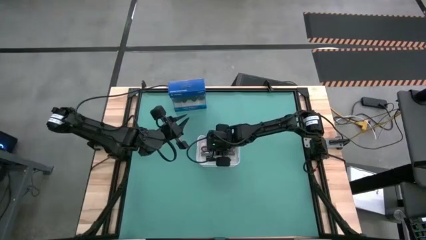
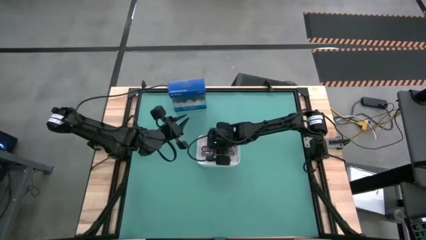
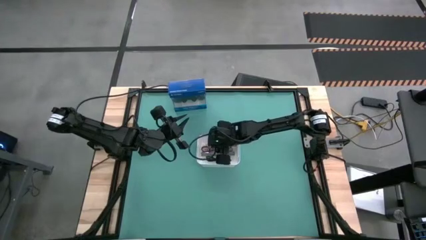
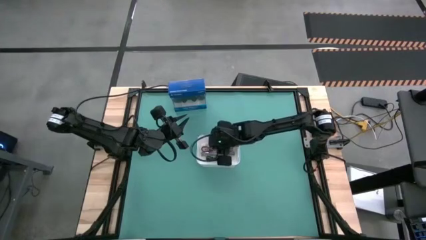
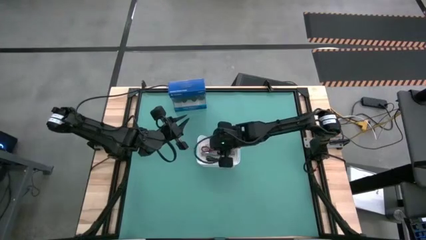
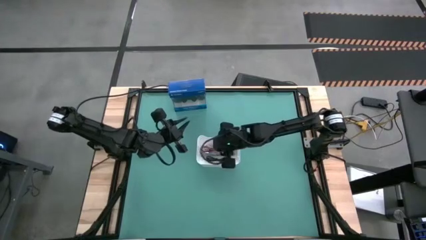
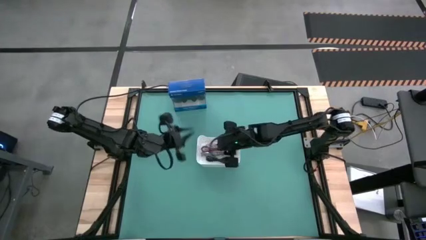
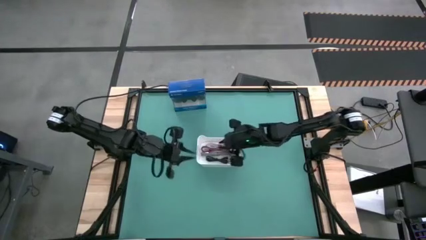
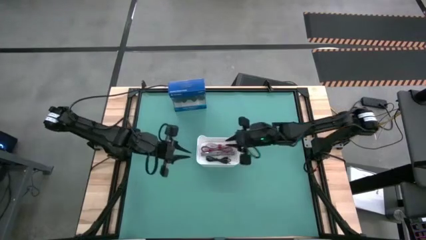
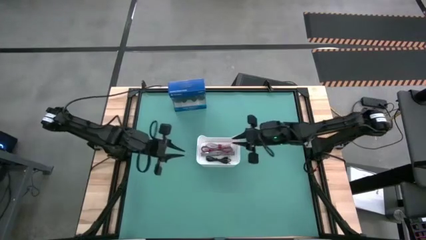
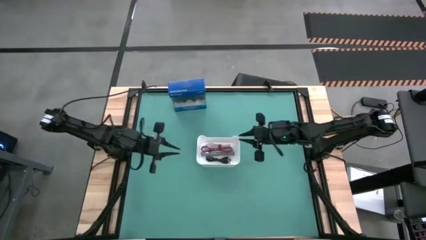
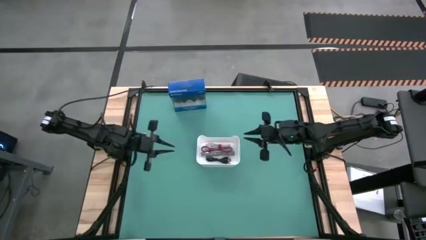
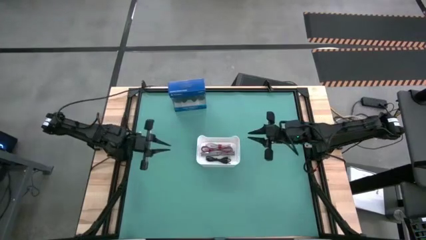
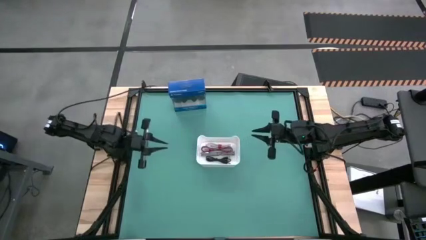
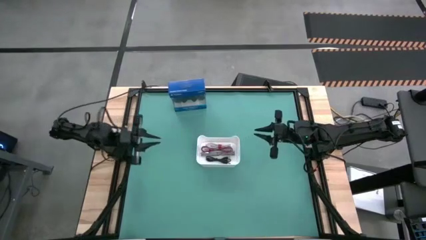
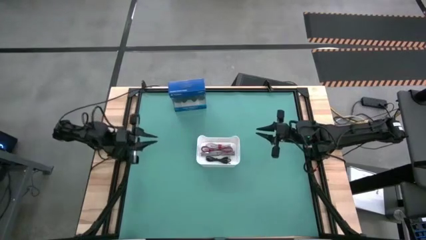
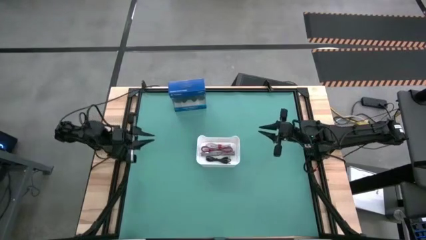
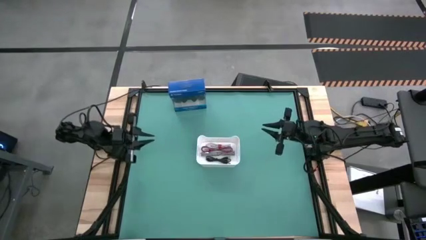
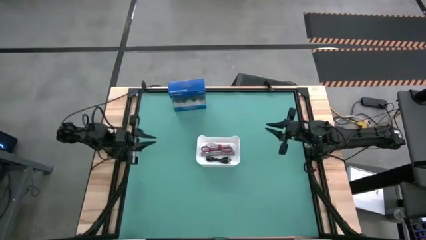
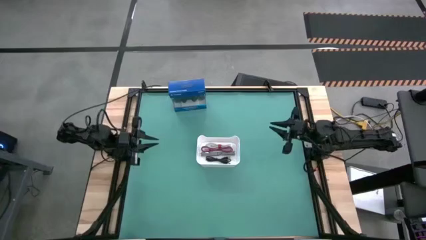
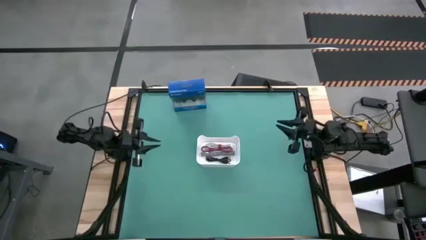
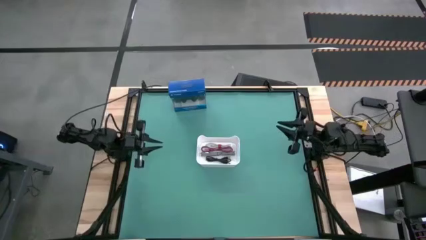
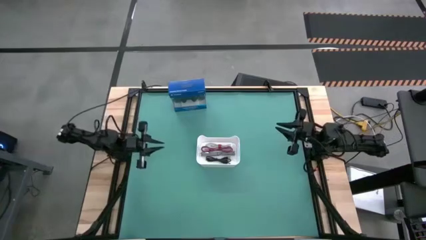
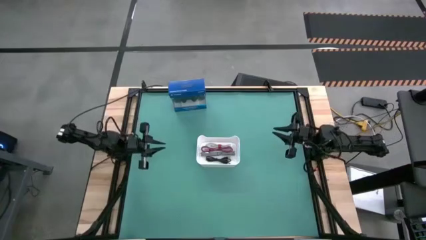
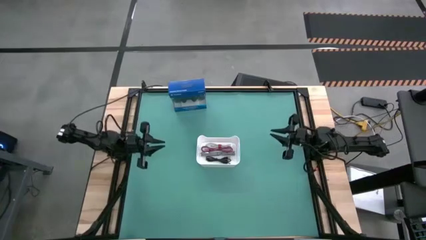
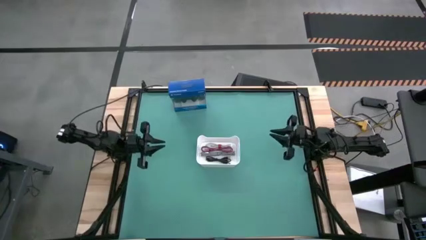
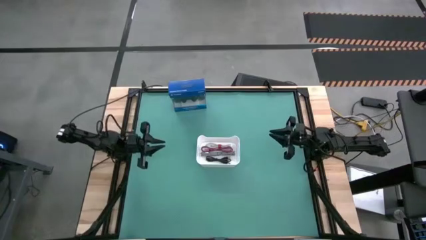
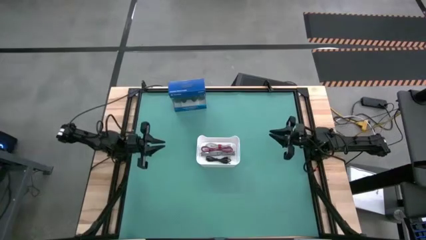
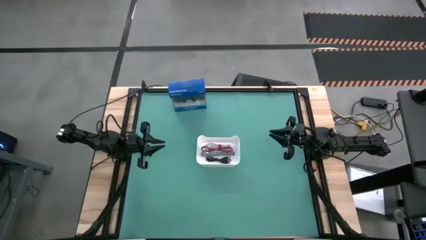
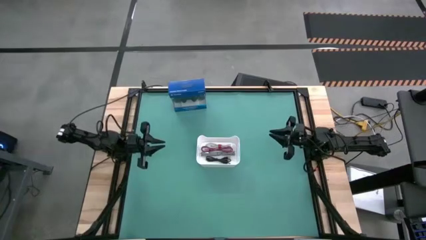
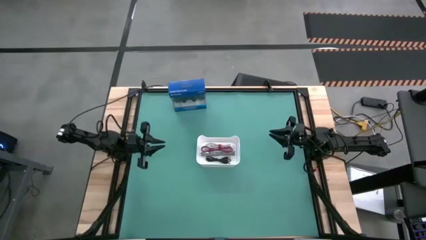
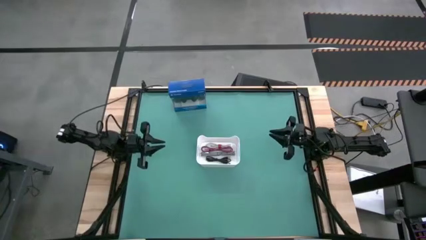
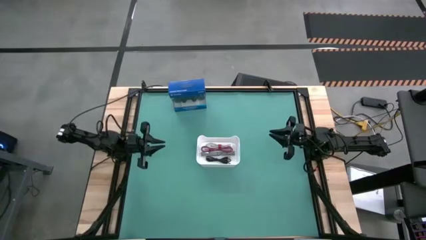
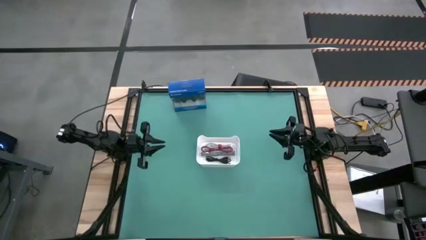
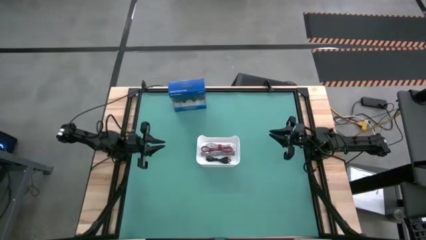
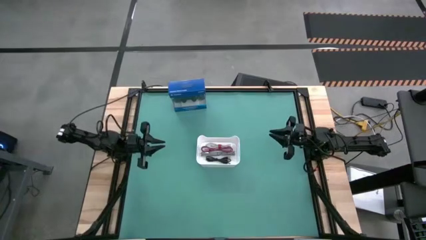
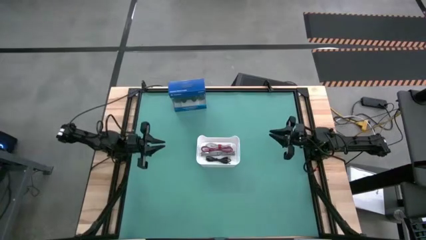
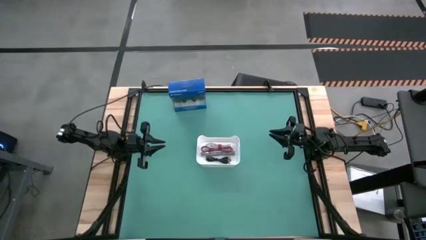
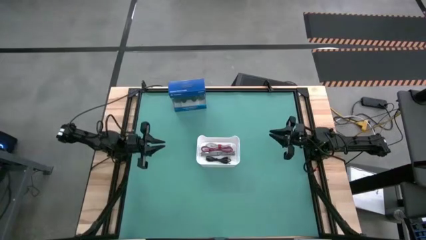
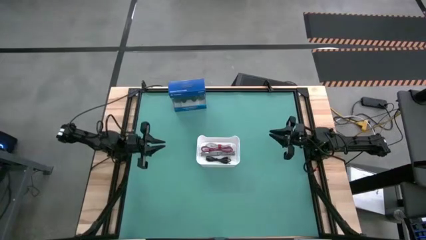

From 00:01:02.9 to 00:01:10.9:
Task: Pick and place USB-C Cables
Return to Home Position

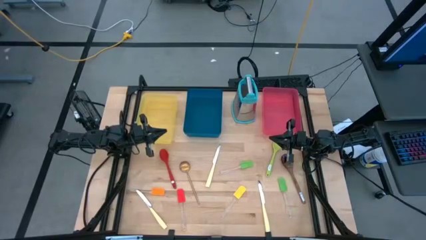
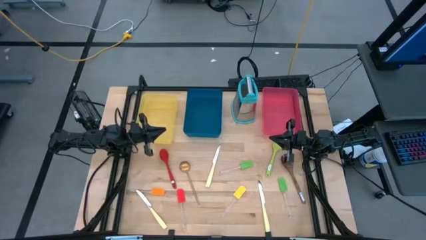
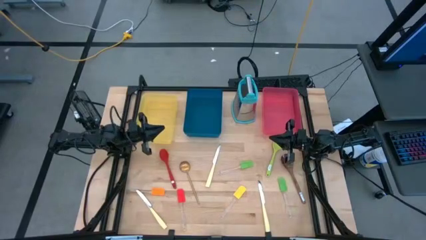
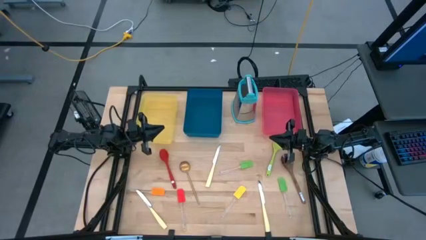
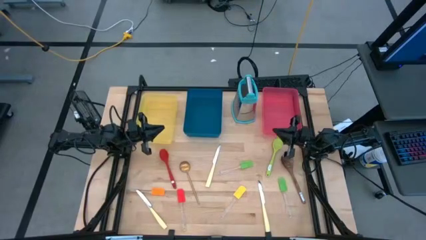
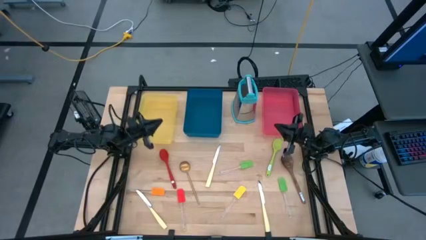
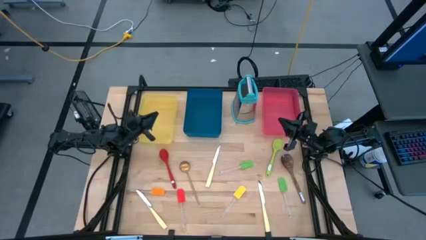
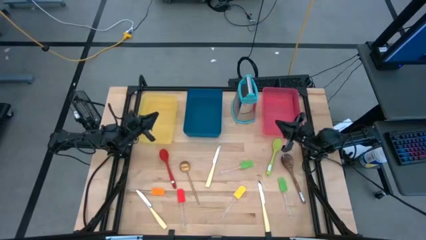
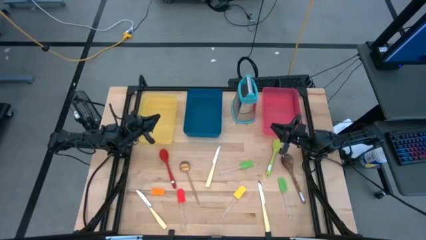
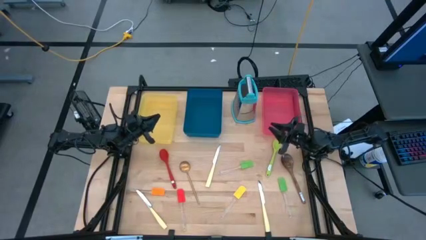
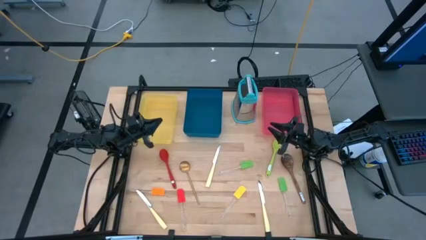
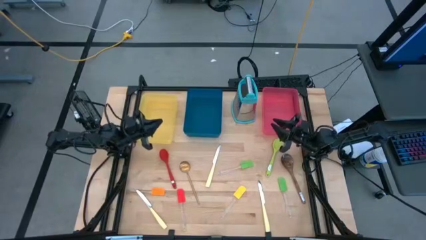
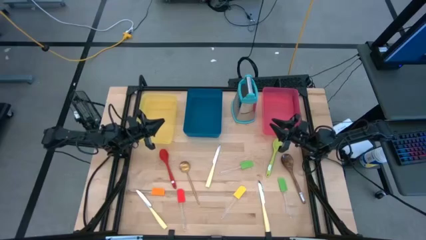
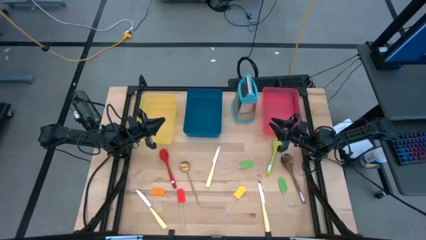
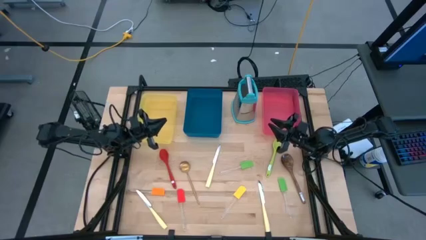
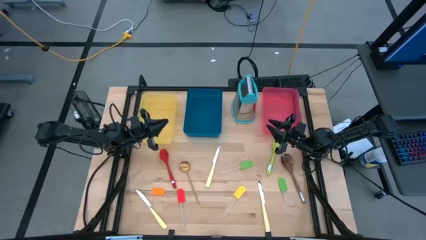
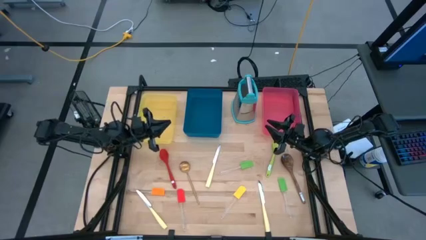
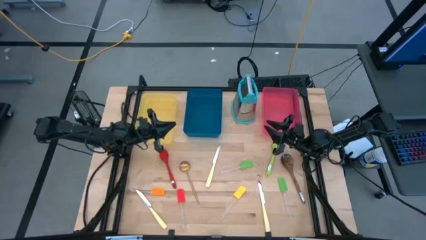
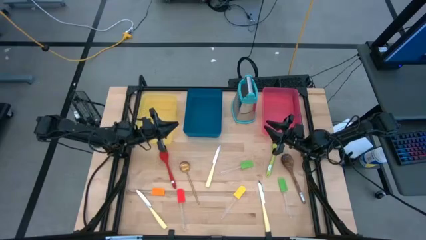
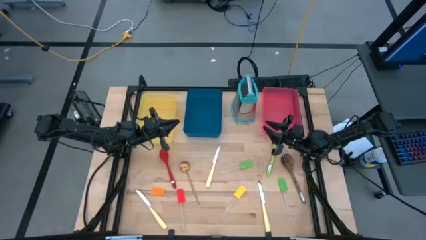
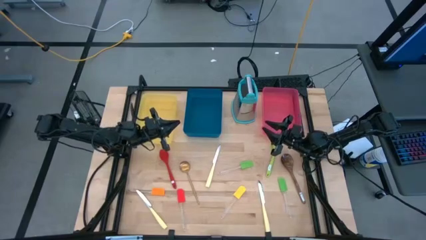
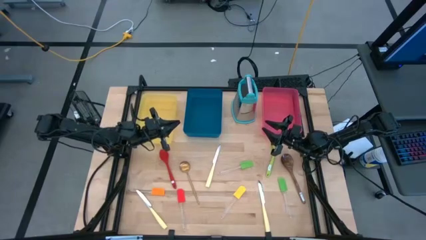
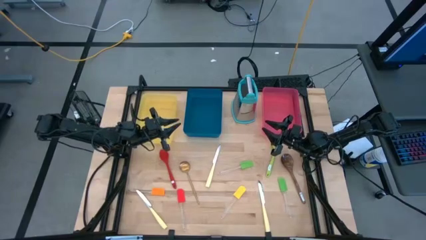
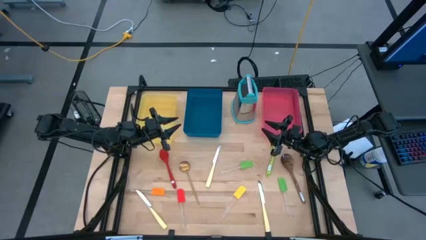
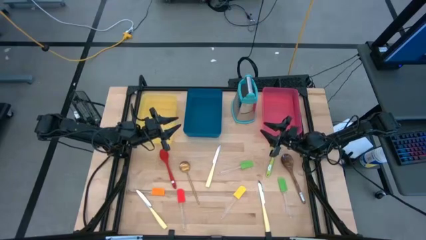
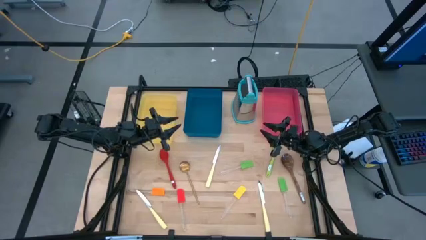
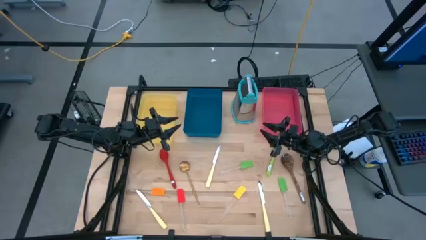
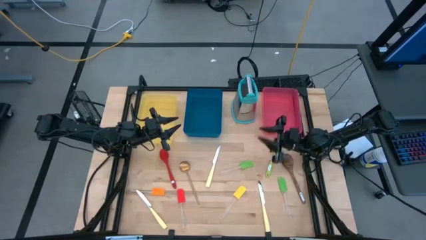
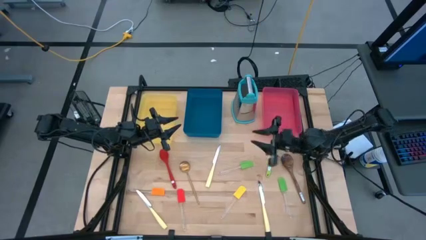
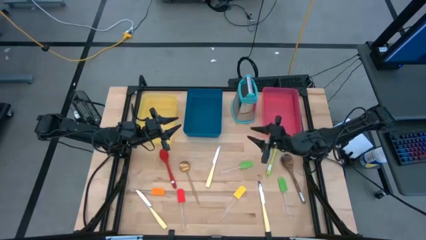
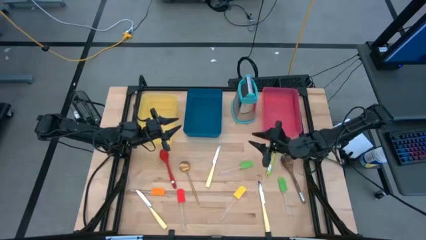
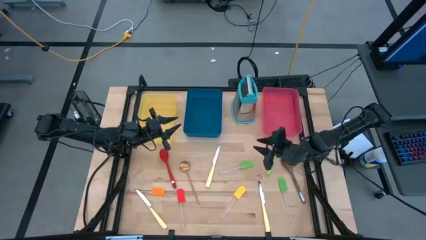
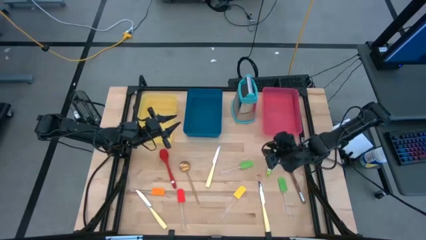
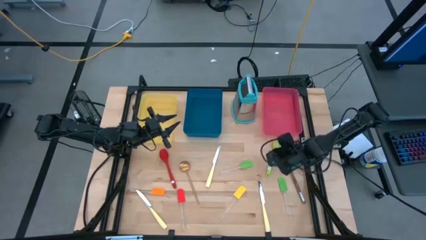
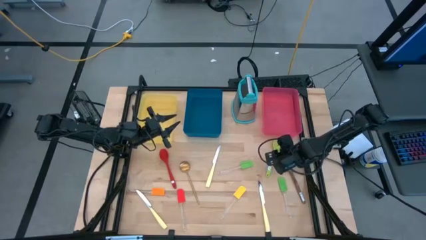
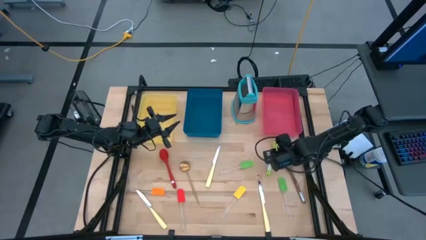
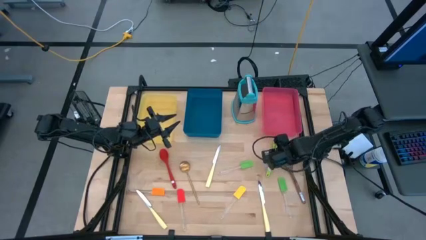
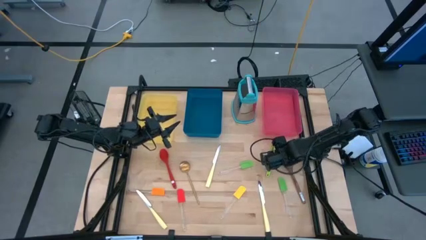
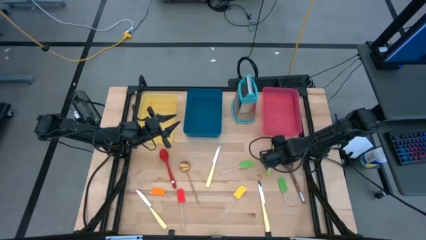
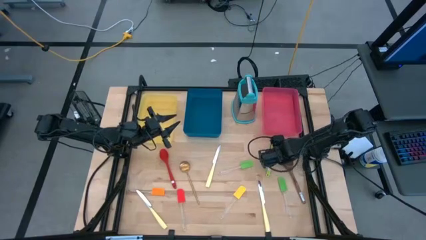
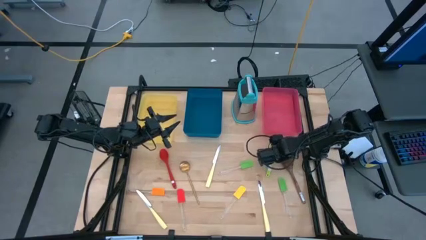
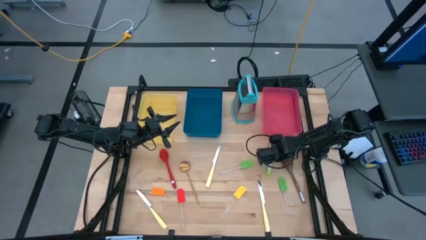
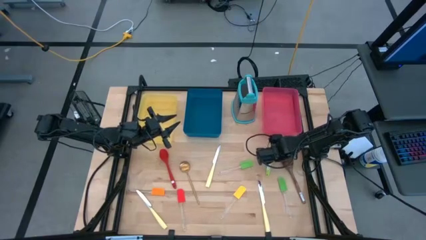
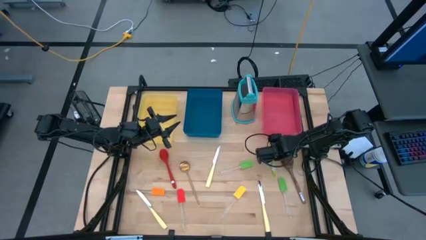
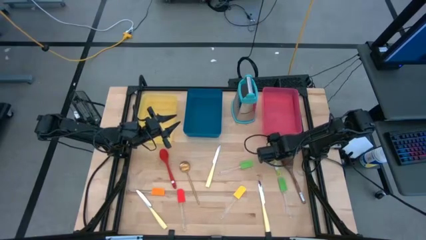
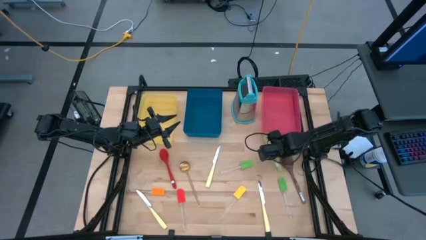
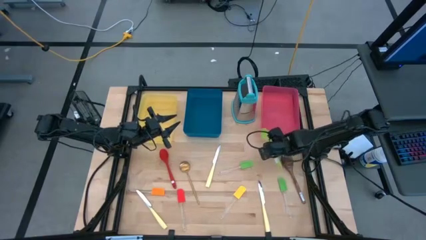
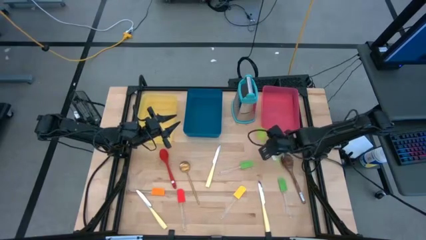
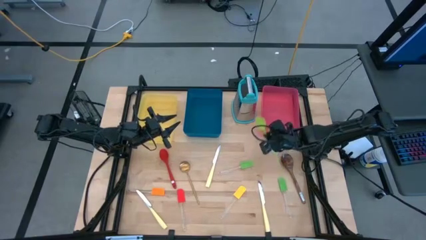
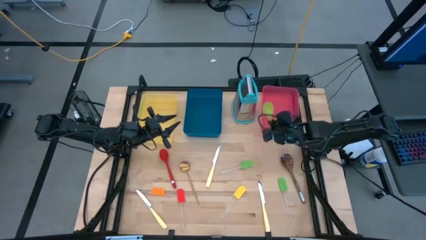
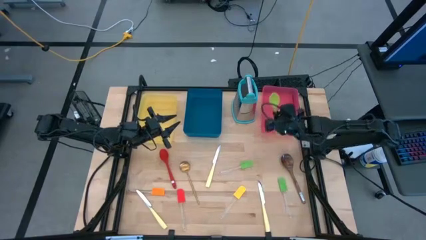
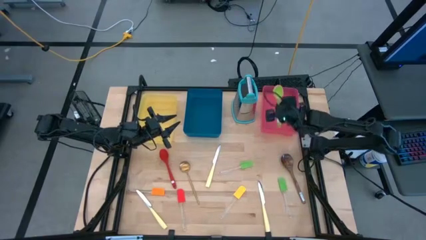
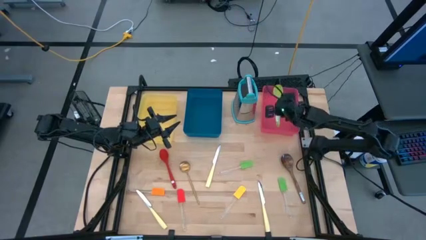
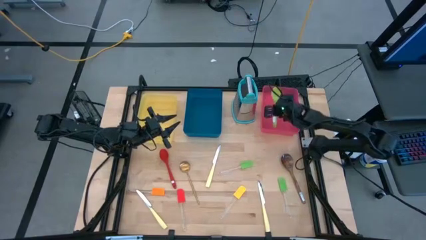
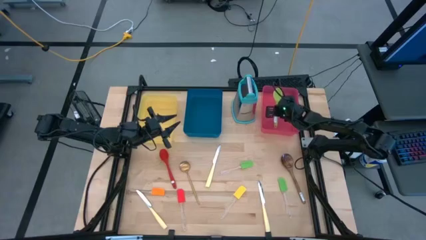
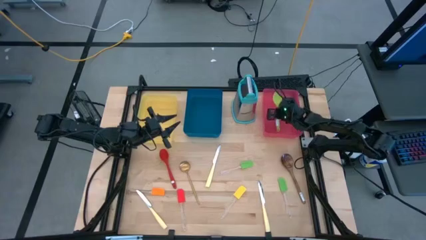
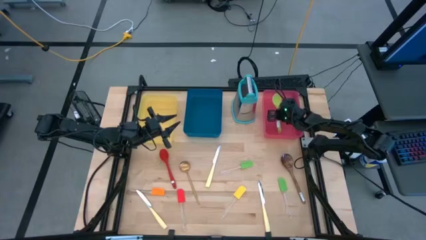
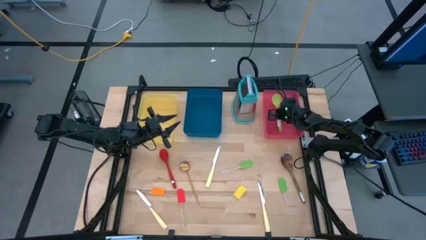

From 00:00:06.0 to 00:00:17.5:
Task: Pick & Place Kitchen Items
Put the green serving spoon into the pink bin
